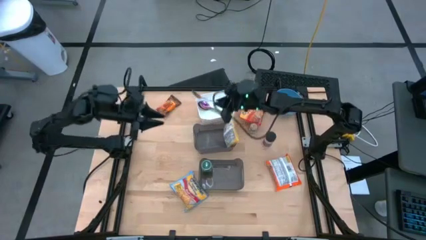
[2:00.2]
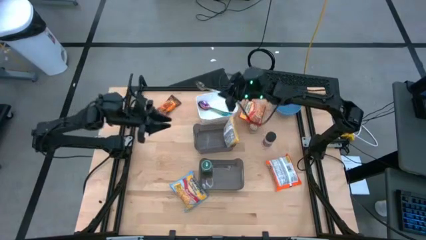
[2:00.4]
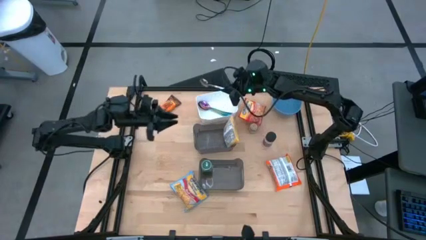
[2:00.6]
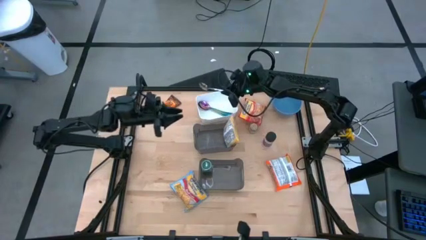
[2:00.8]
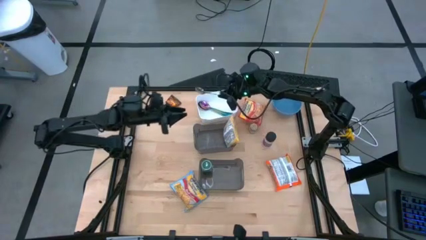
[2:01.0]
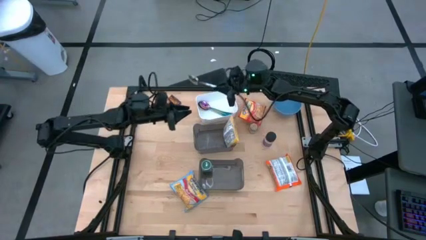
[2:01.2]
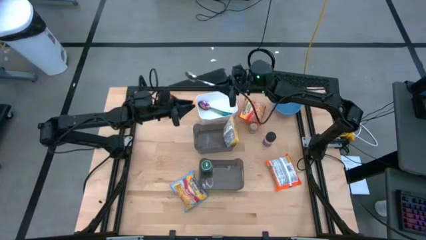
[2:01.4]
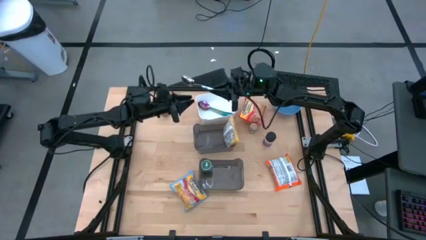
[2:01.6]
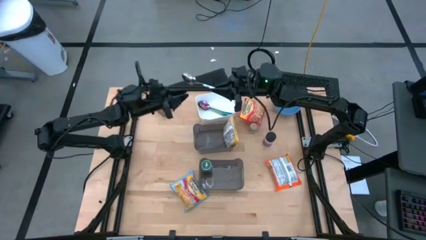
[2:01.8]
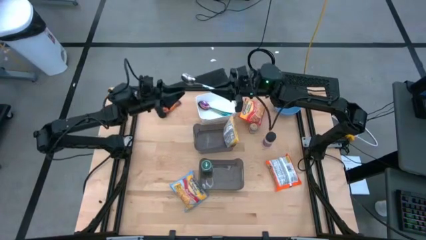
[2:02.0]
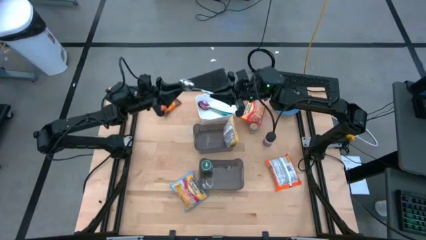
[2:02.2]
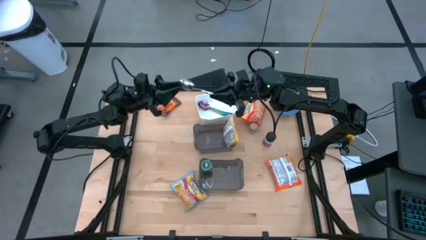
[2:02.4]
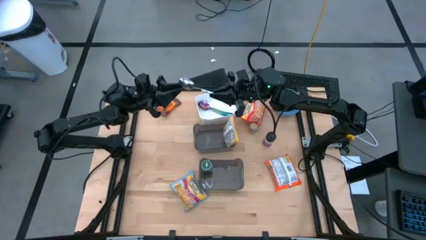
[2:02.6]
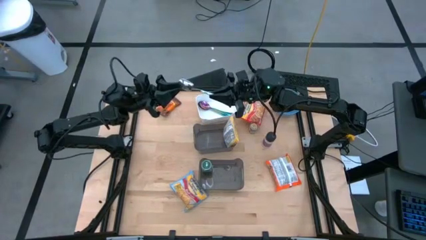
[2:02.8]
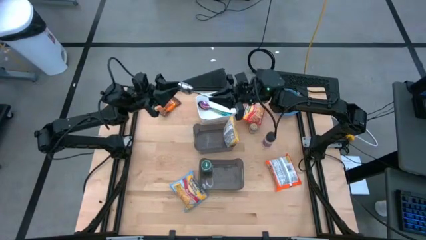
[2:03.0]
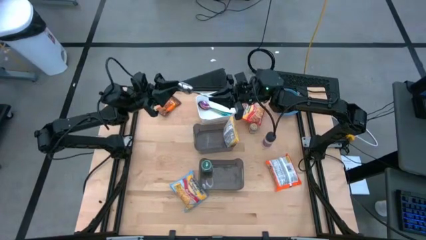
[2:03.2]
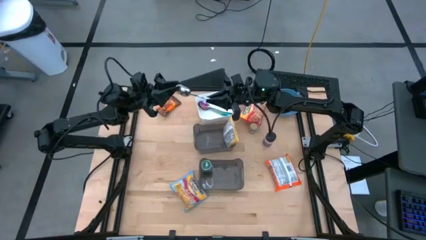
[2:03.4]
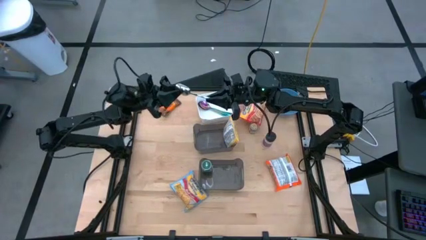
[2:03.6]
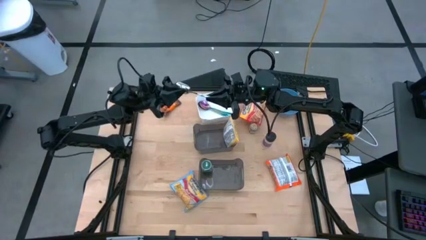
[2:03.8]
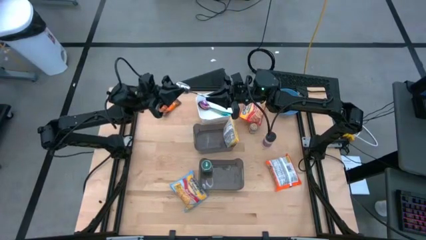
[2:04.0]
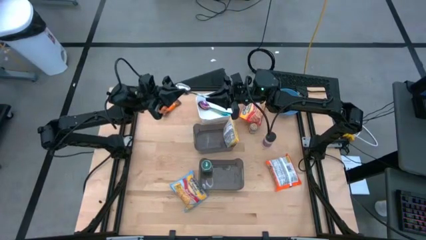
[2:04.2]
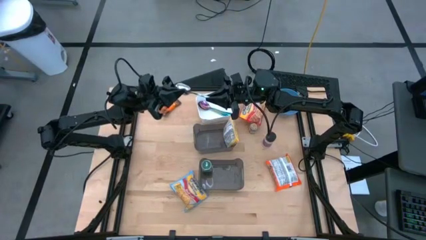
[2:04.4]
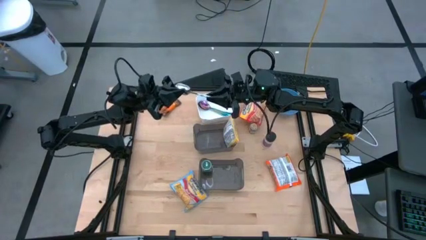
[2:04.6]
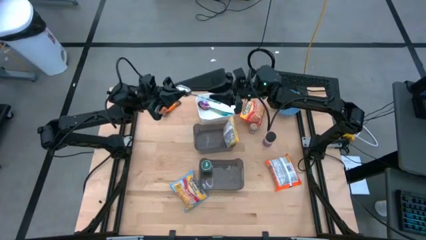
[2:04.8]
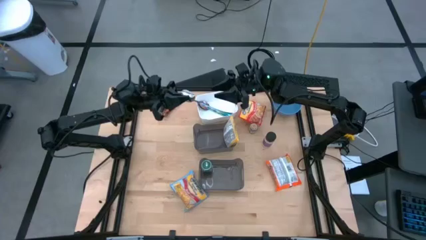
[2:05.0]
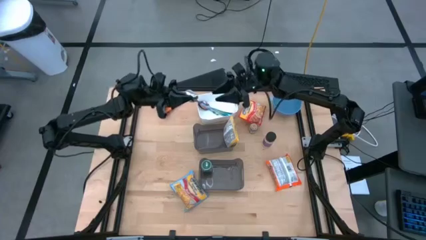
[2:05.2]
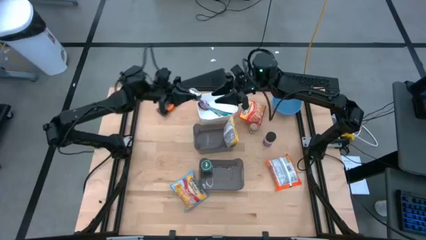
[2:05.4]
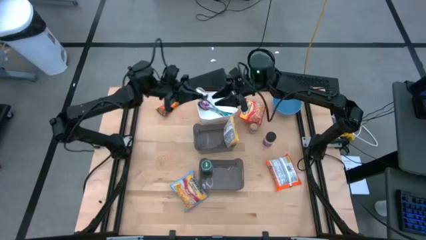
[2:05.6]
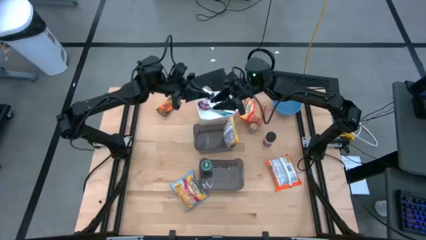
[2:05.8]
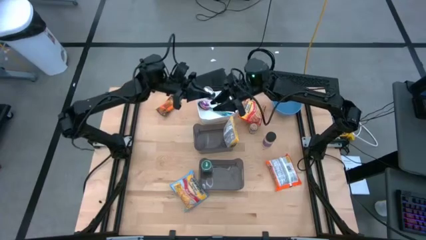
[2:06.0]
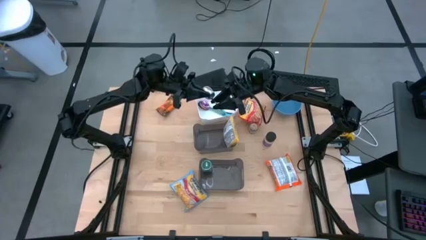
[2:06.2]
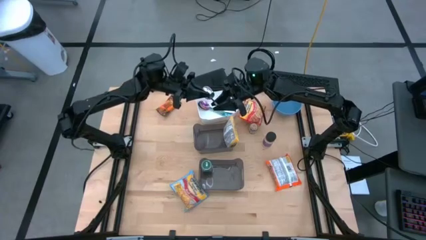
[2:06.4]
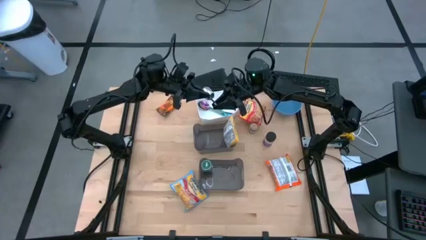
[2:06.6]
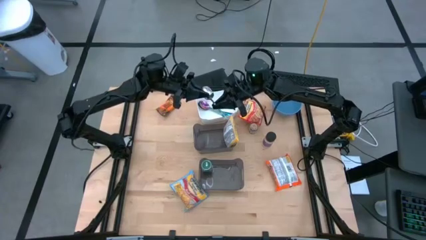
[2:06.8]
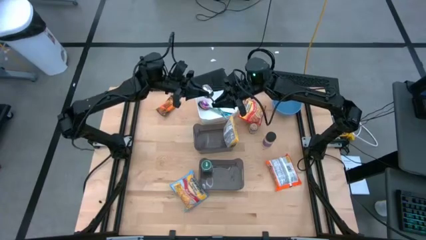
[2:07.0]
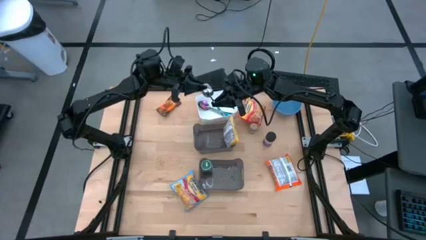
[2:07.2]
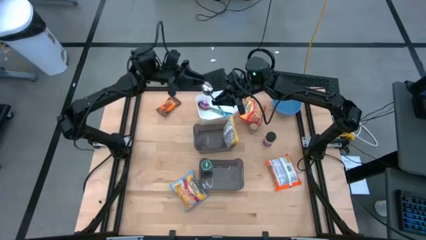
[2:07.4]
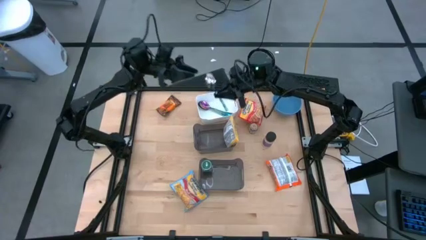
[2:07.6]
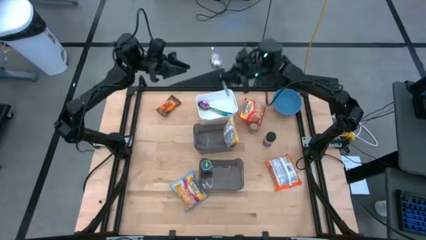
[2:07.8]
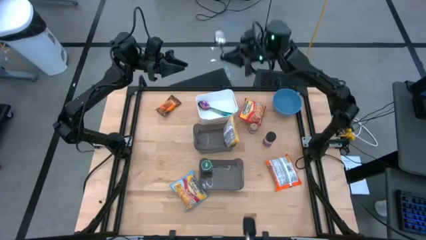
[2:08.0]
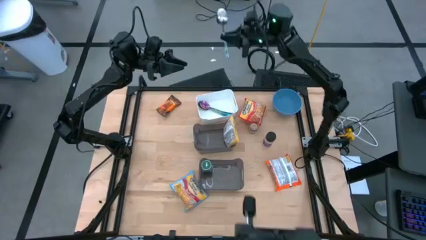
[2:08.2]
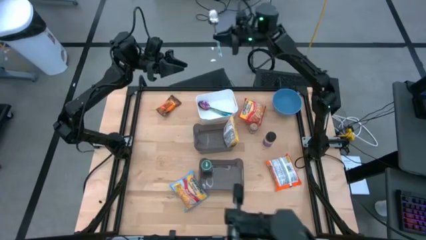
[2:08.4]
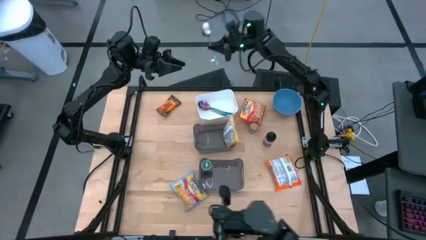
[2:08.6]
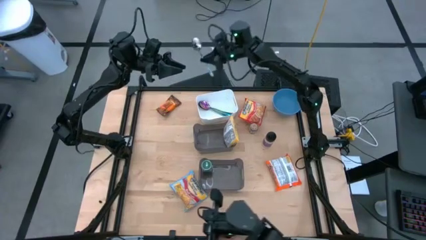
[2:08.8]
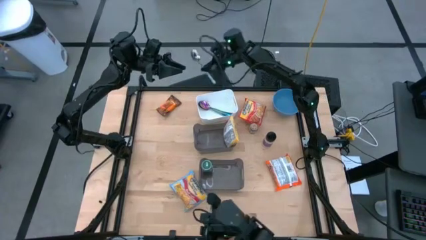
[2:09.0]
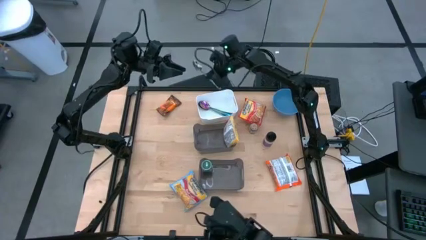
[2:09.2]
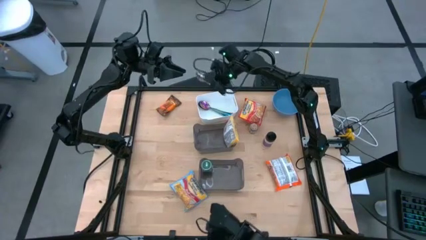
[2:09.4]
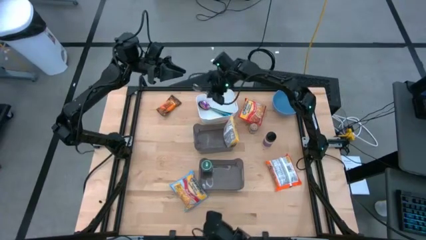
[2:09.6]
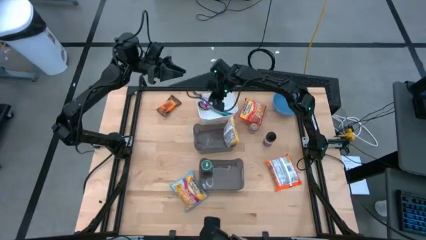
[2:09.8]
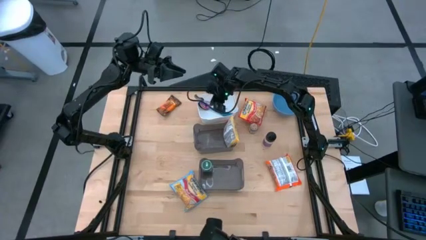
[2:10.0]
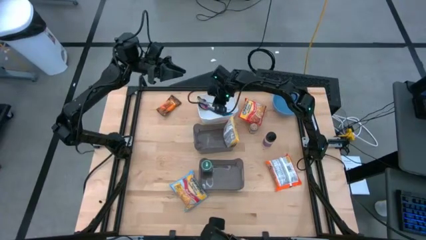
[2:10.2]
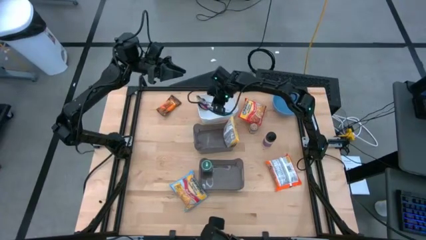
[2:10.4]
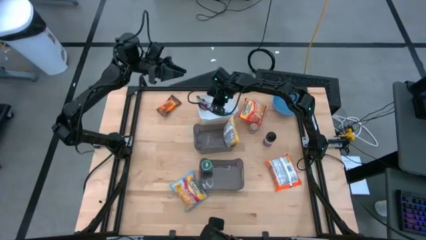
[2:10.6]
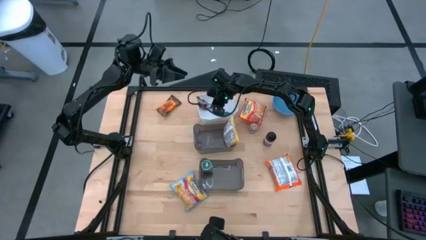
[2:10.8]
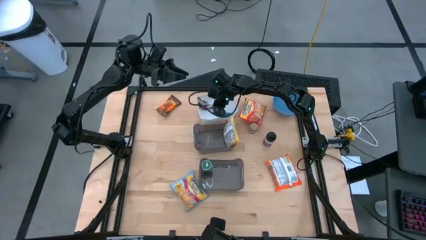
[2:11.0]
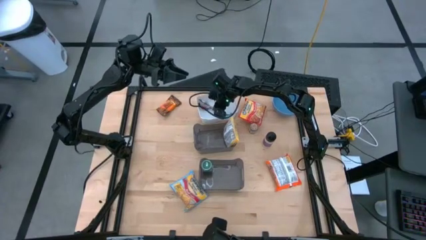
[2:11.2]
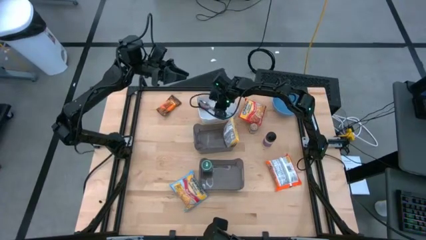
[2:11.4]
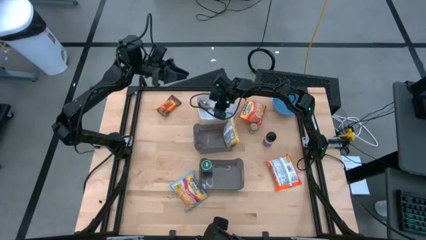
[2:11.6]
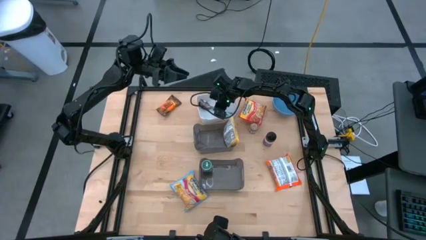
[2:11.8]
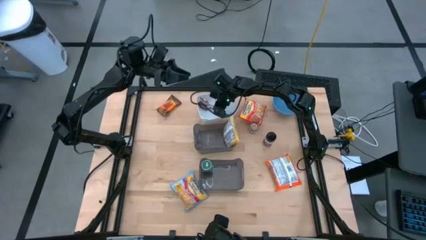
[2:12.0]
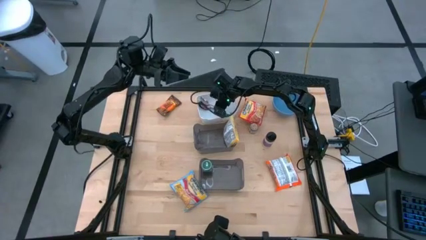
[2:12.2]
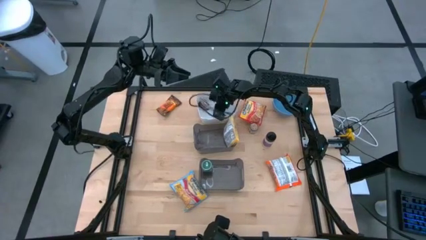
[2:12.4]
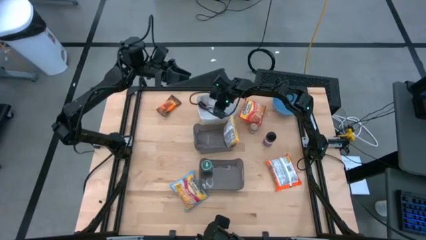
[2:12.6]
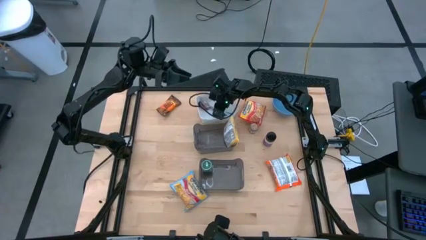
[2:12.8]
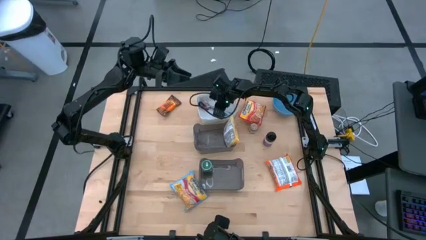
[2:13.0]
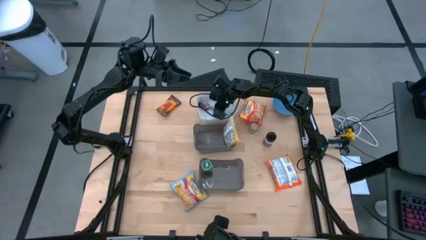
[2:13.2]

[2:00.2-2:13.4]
Task: Pick & Place Food Item
Put the blue patterned spoon into the white bin
